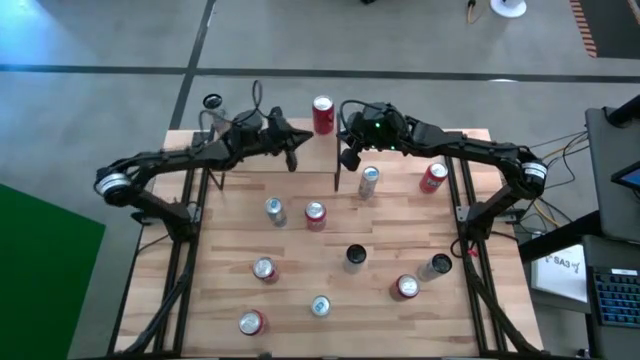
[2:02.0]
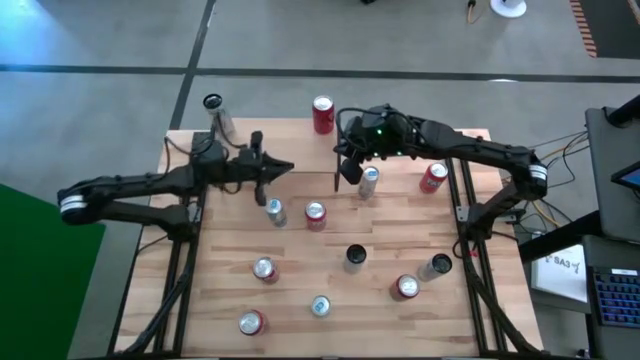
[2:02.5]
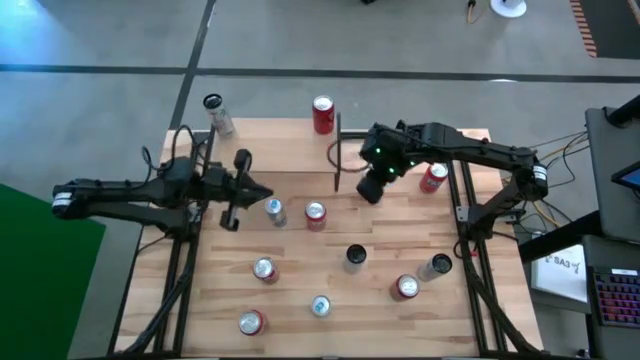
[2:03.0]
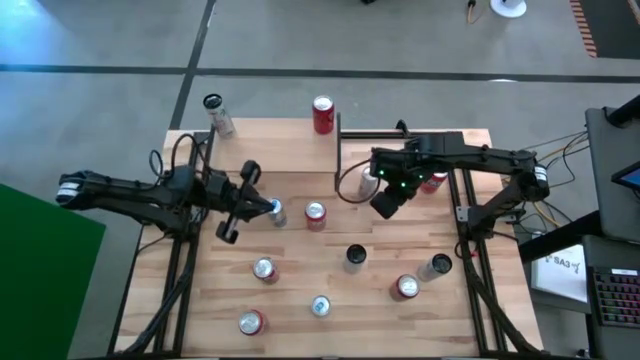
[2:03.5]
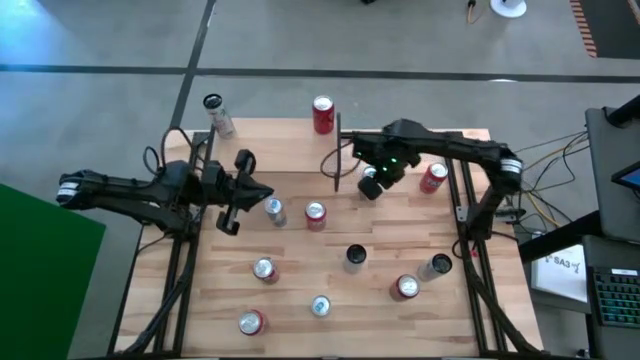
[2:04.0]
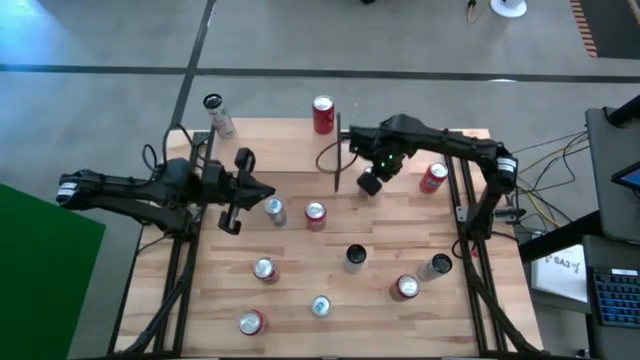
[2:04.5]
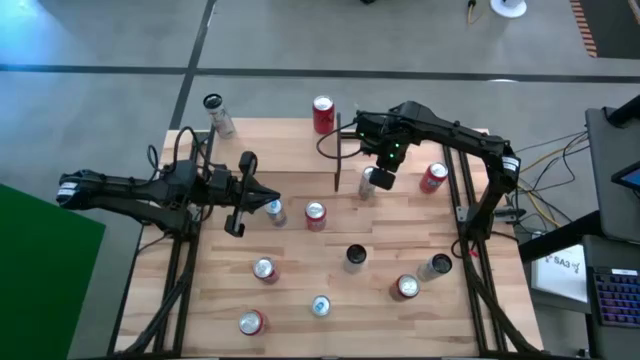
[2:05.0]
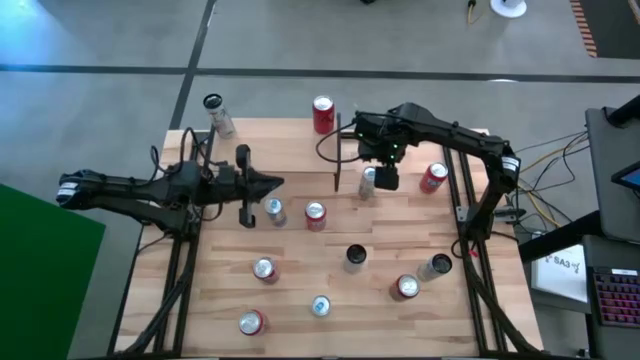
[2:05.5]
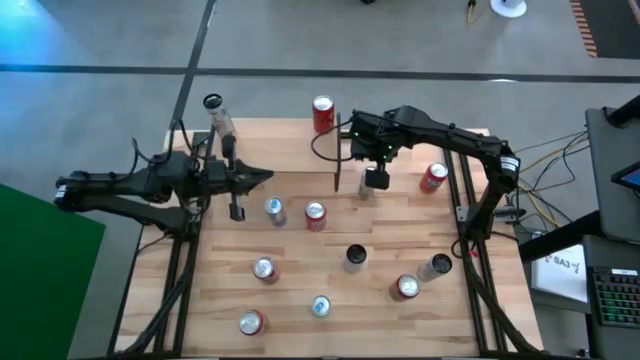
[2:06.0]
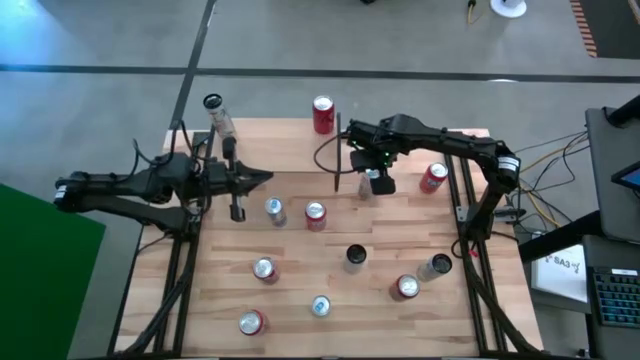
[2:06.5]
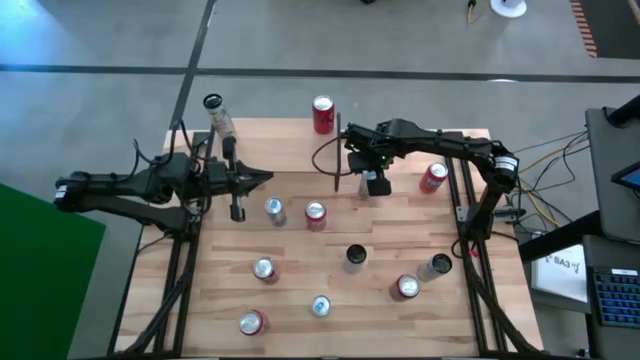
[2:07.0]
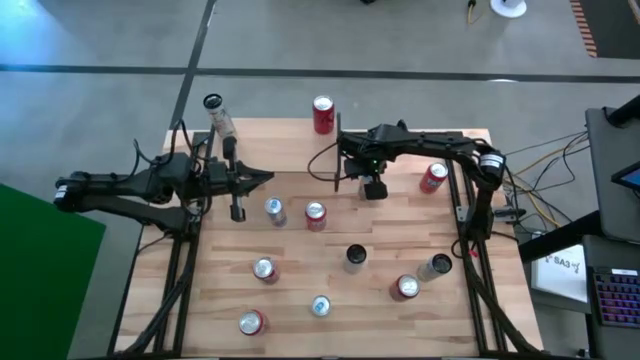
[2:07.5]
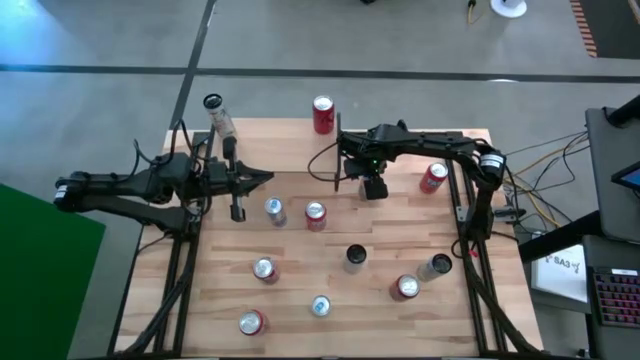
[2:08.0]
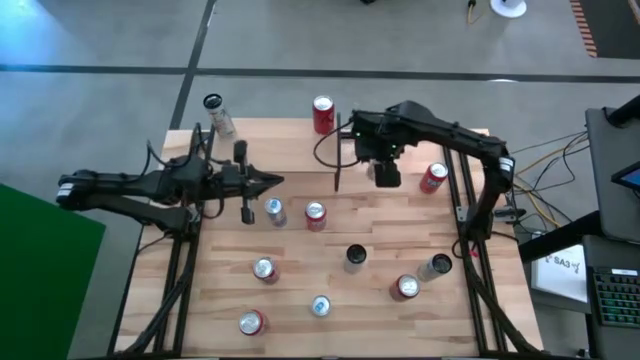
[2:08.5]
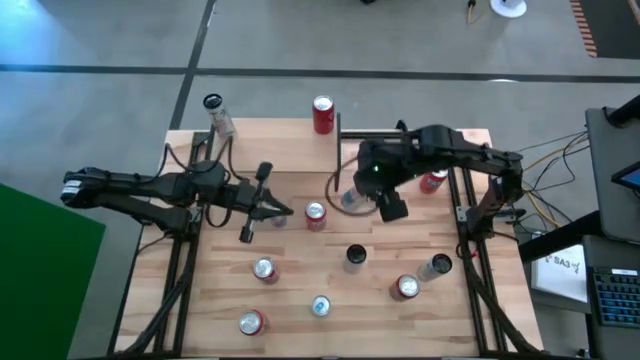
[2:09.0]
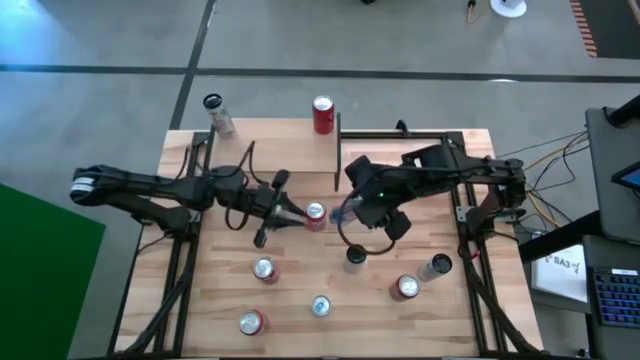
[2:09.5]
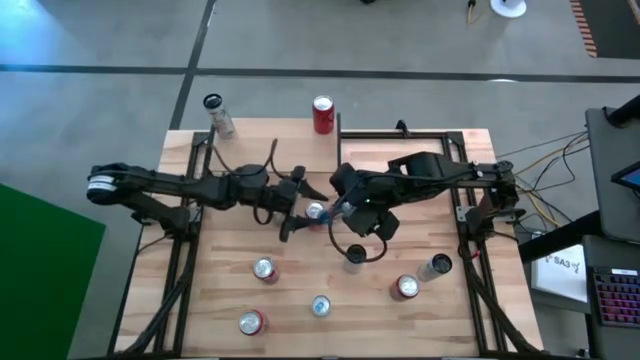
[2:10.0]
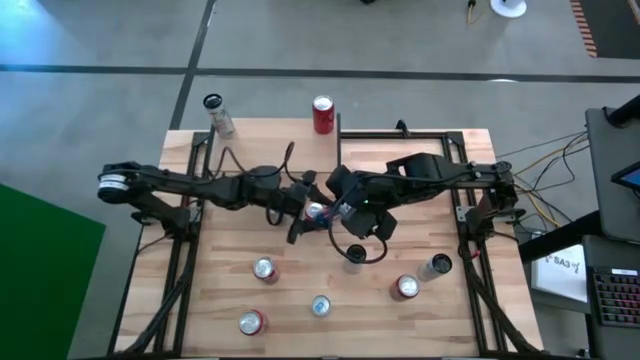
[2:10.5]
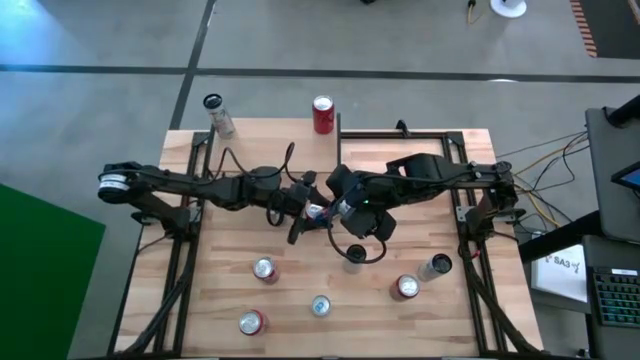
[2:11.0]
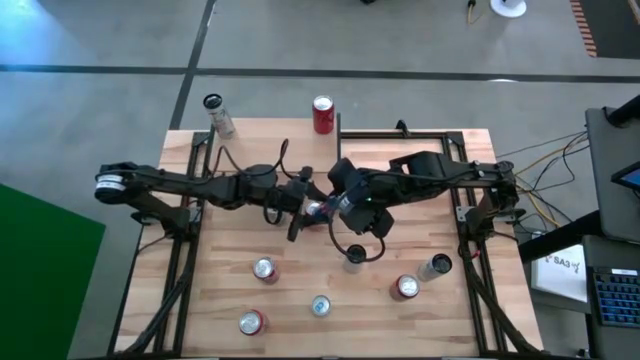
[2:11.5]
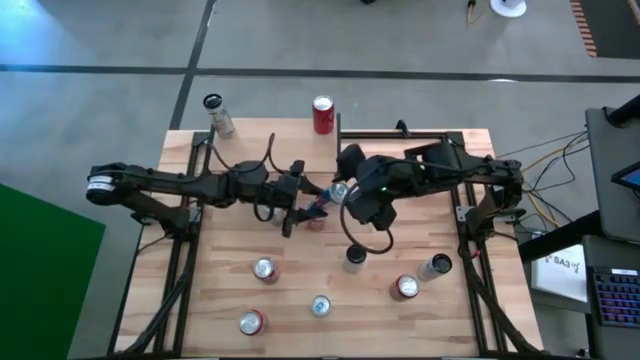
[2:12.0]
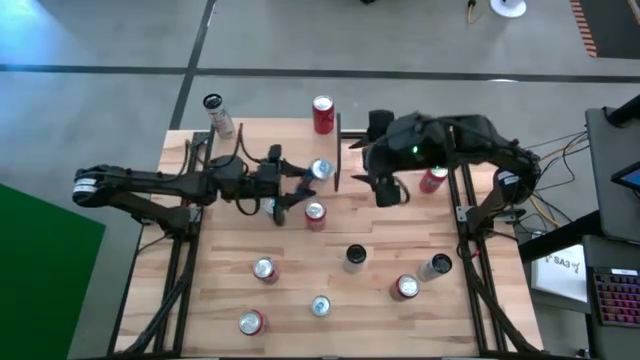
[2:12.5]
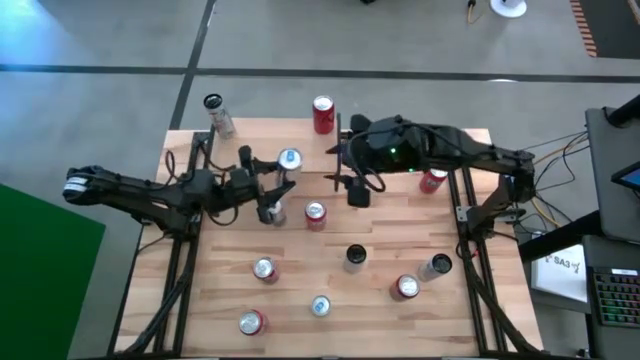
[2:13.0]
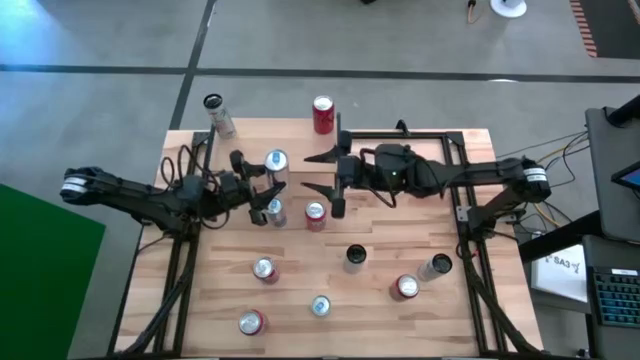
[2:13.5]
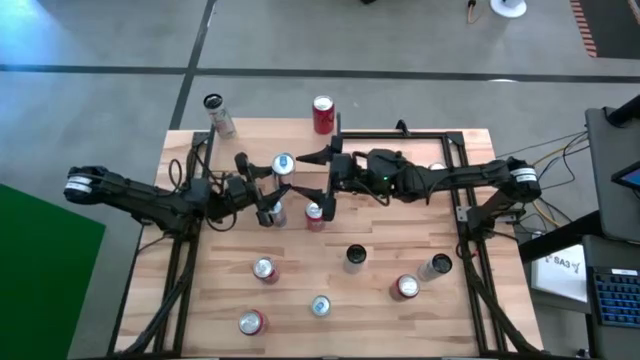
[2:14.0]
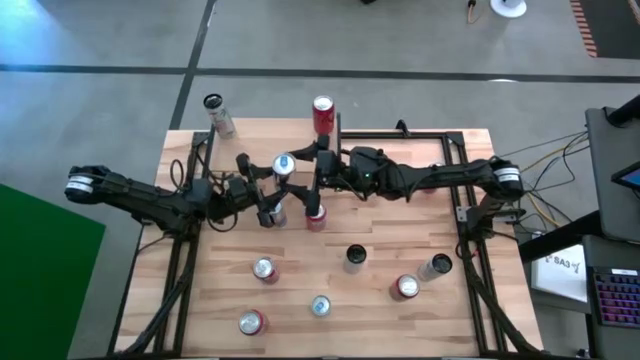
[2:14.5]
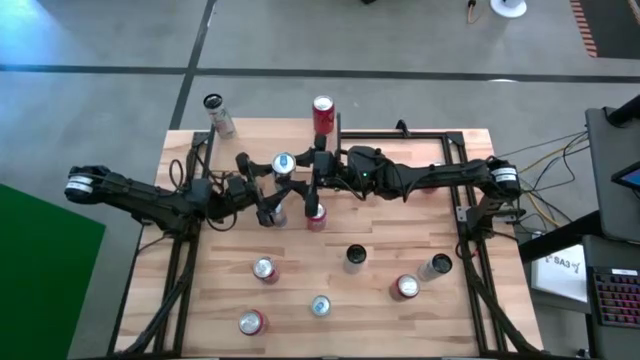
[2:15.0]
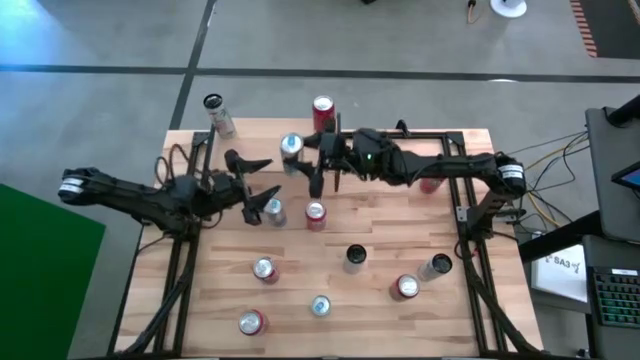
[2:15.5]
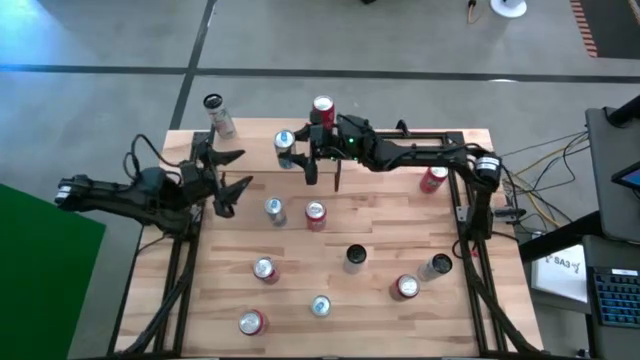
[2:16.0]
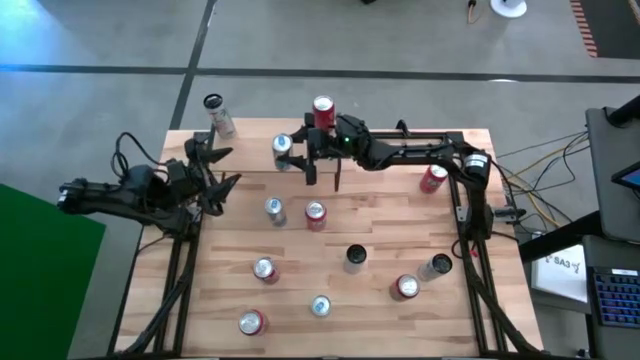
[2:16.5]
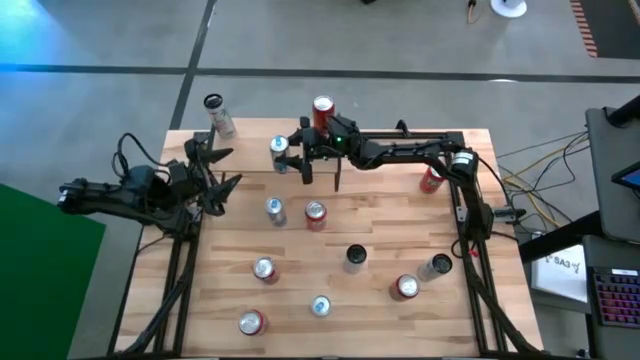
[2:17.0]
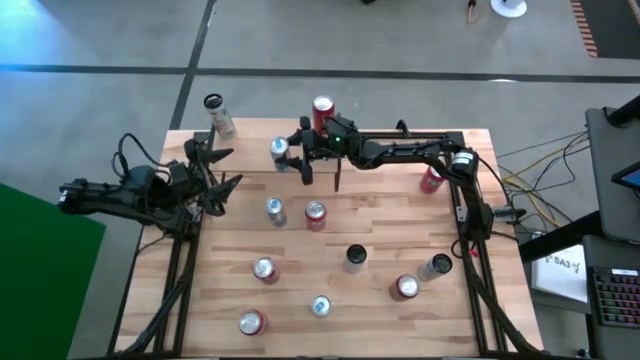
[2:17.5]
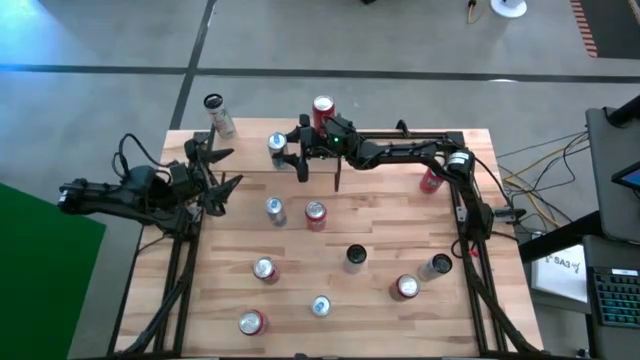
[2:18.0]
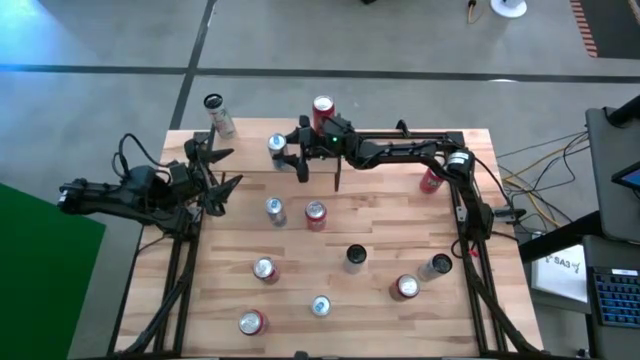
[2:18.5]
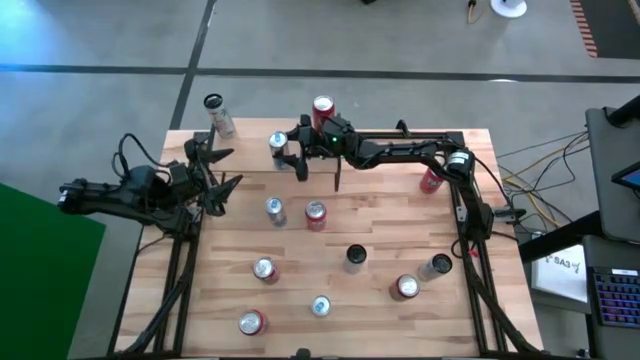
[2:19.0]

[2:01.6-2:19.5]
Task: Place canned beverage on shelf
Put the blue soda can on the shelf

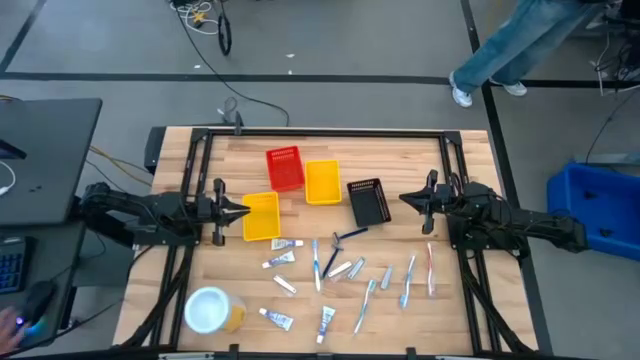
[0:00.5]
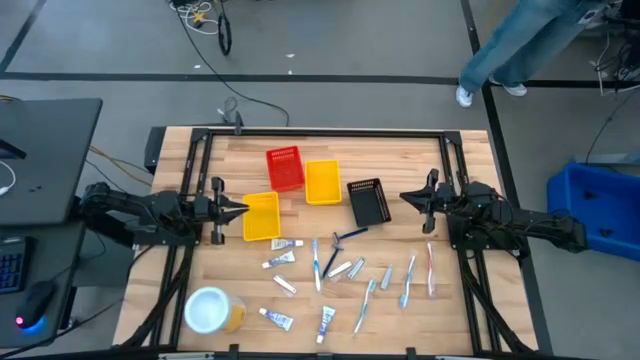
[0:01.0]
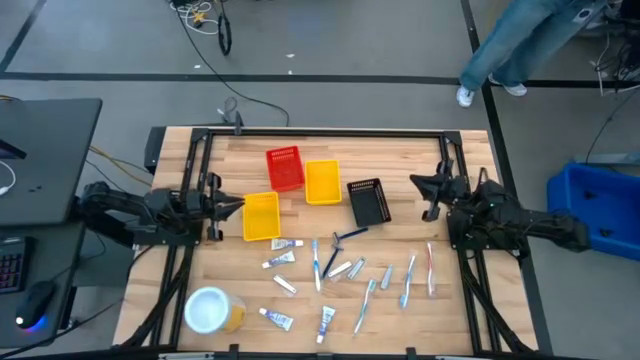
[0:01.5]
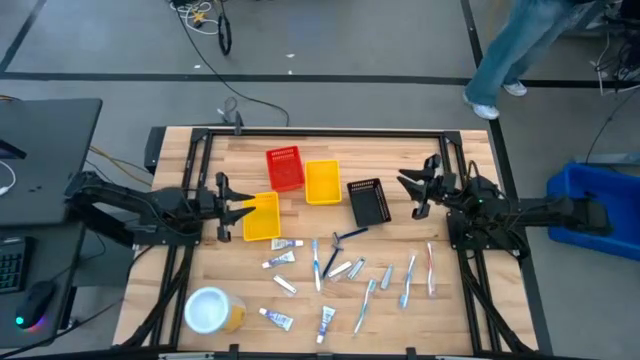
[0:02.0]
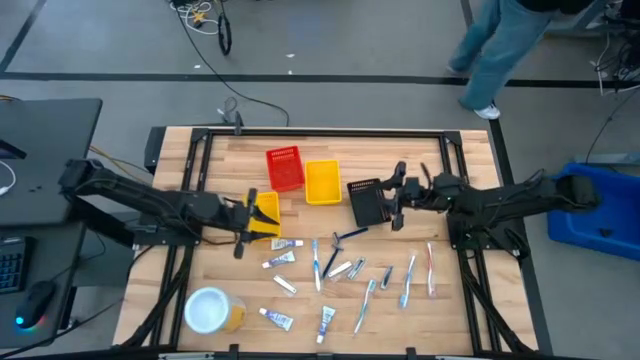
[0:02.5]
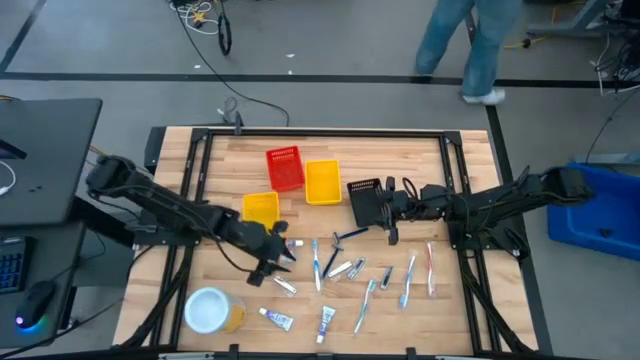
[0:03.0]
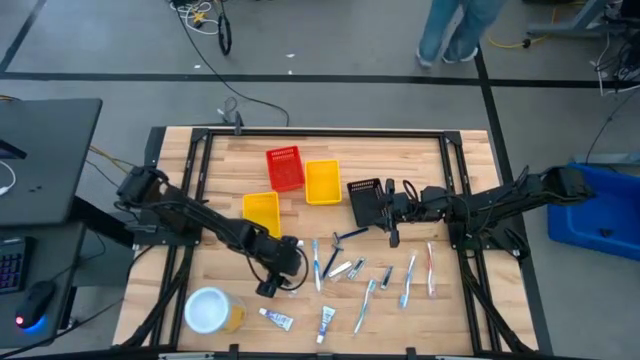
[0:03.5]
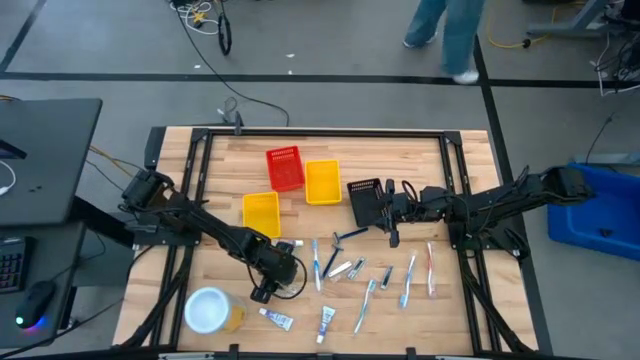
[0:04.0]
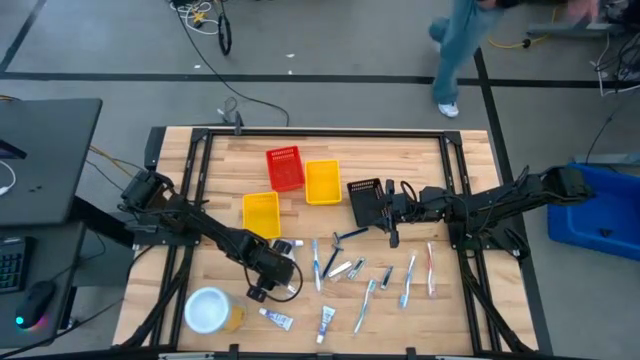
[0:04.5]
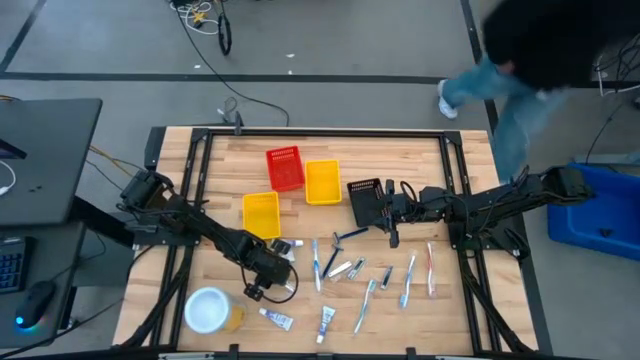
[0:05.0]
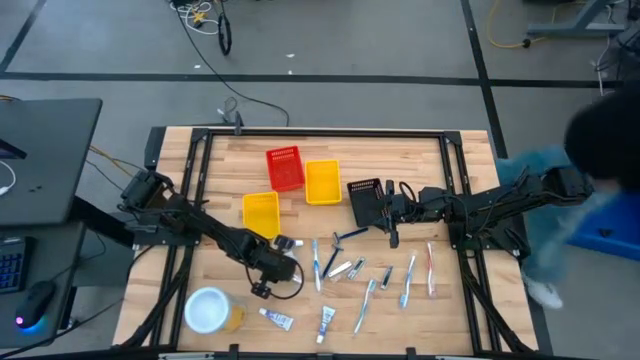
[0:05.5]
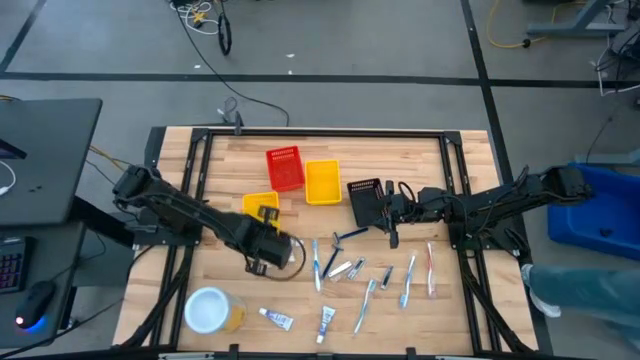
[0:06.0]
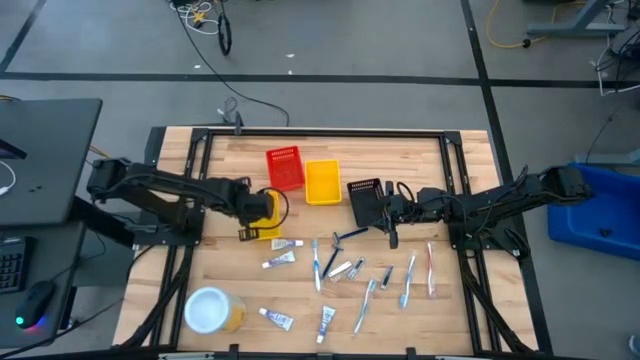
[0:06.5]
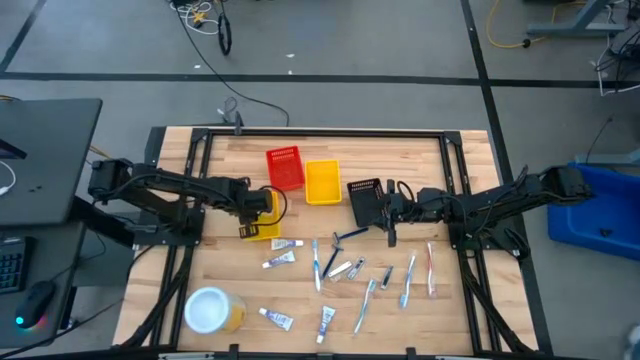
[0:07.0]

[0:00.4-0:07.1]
Task: Pick & Place Travel size toiletries
Put the nail cutter into the left yellow bin
